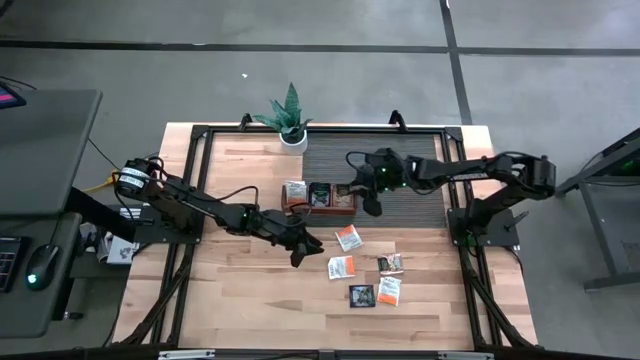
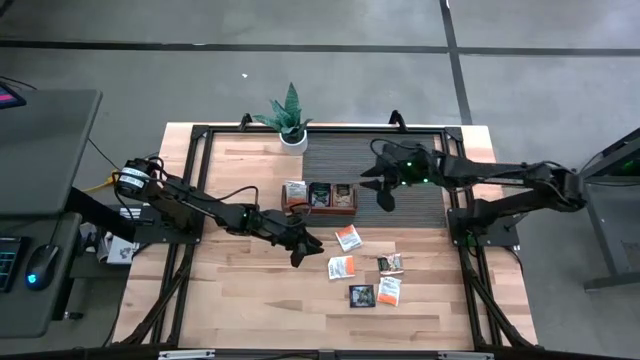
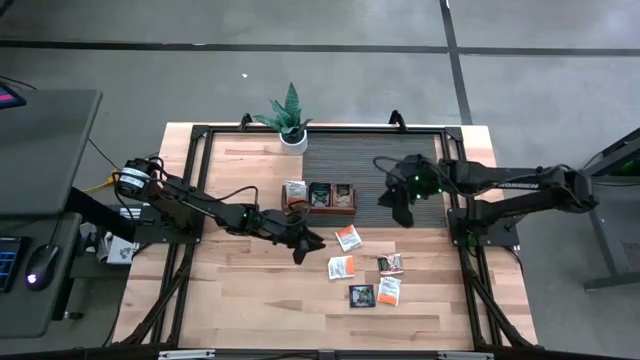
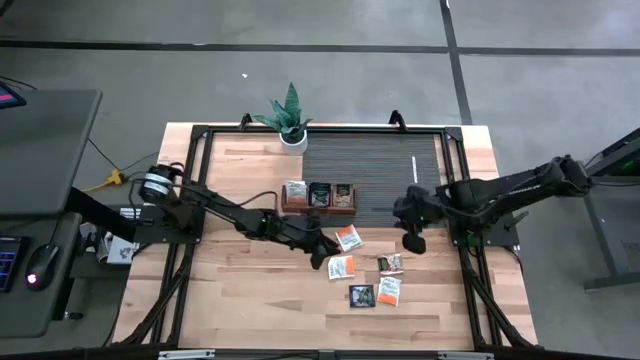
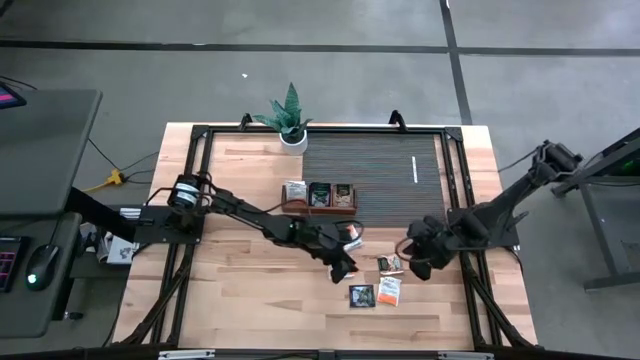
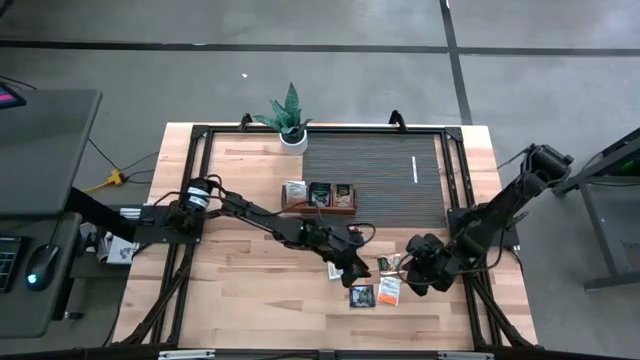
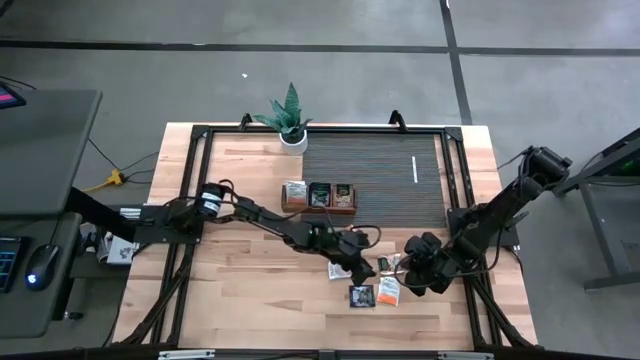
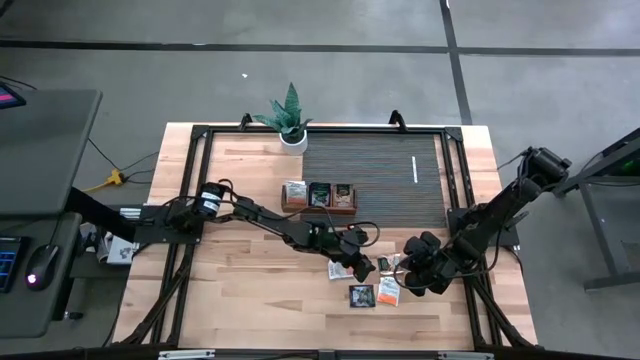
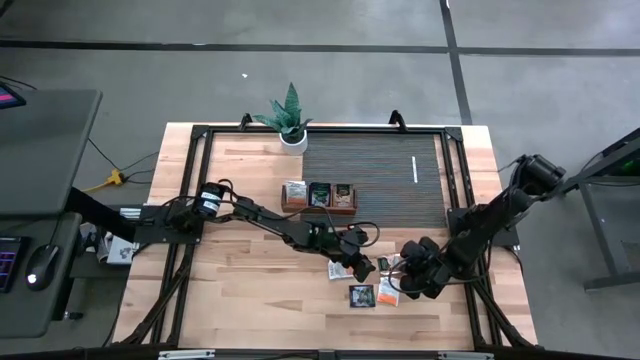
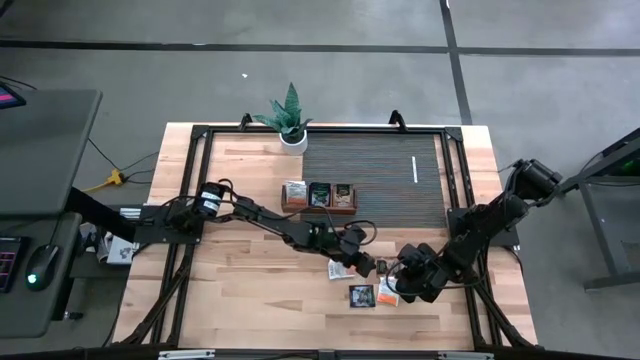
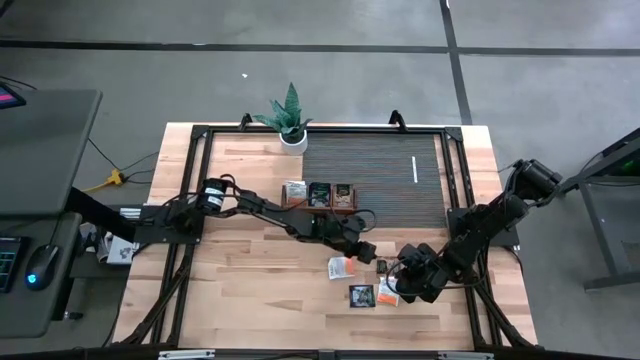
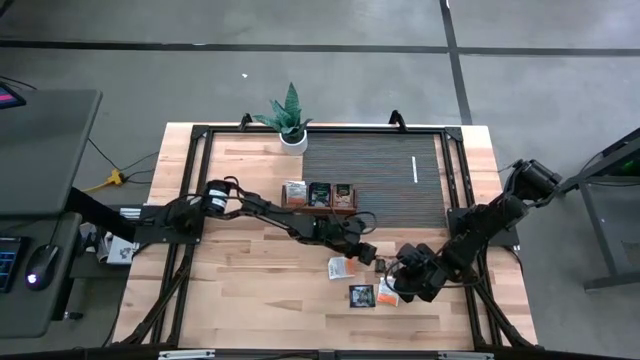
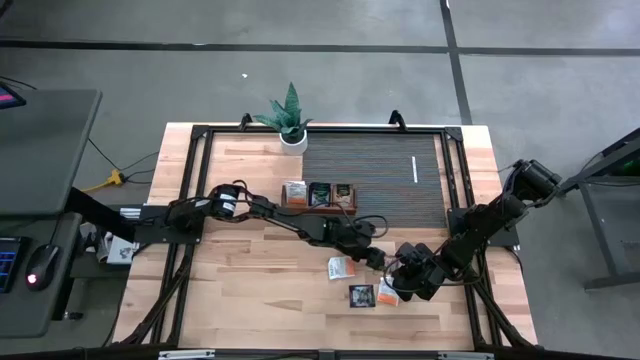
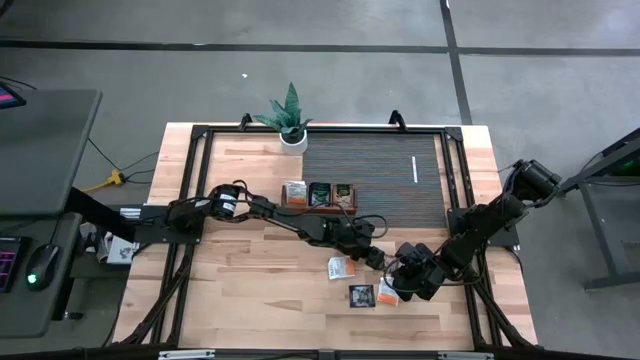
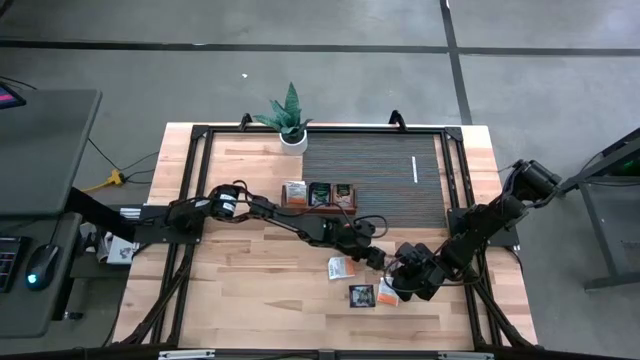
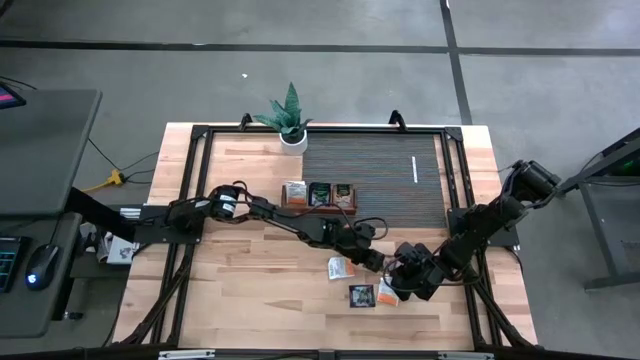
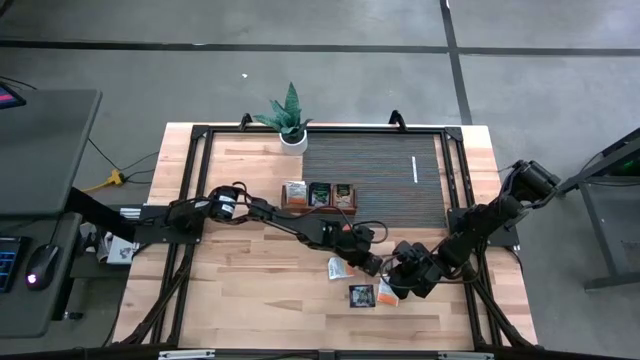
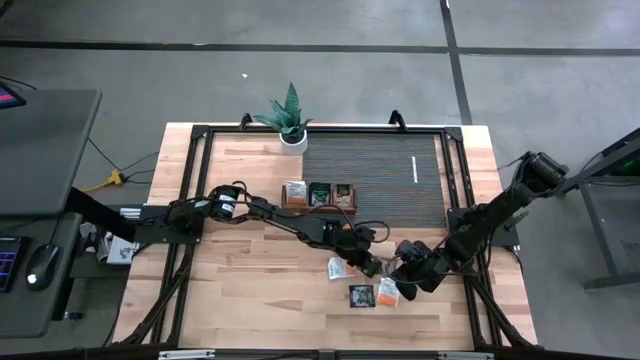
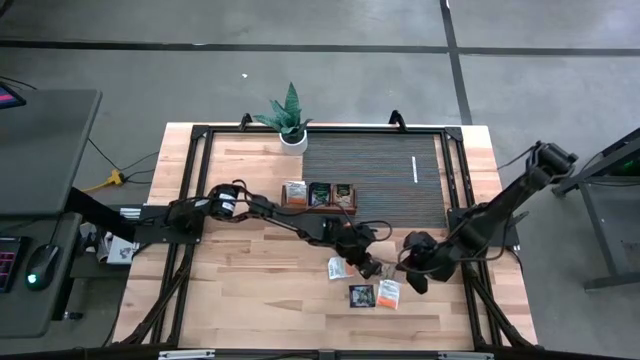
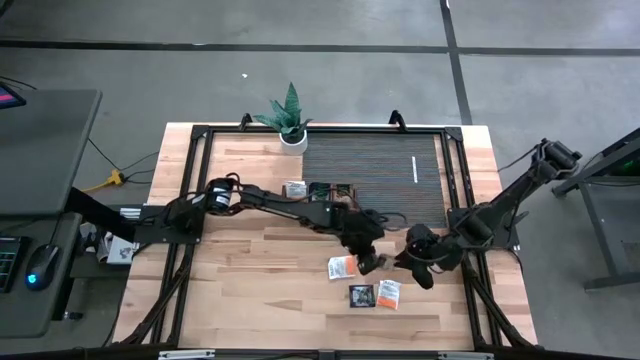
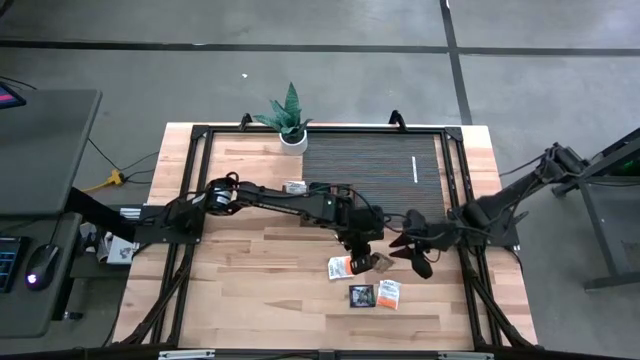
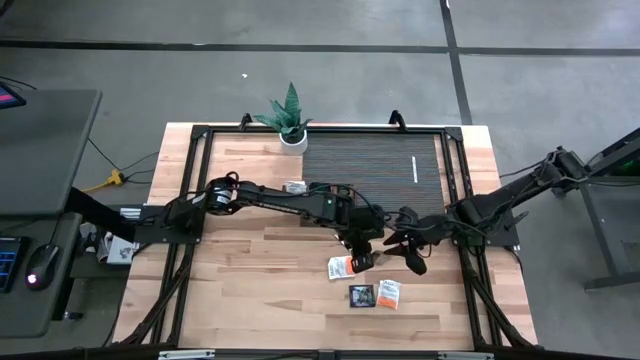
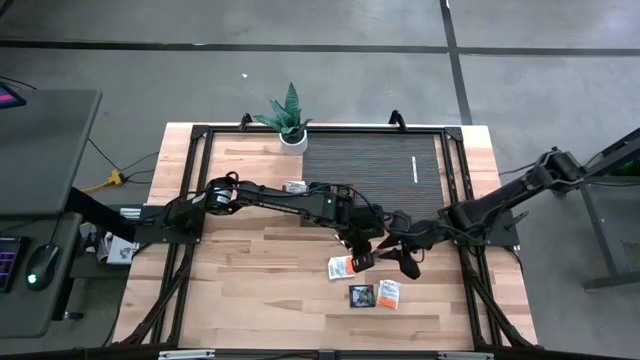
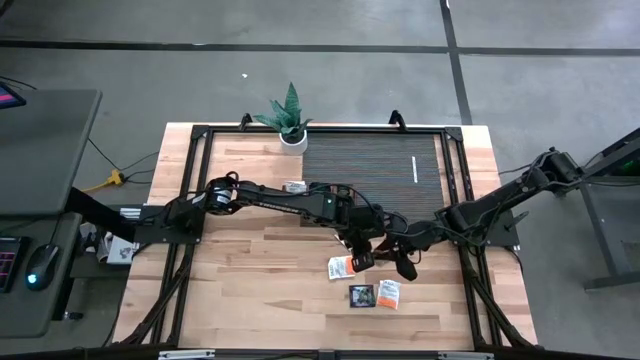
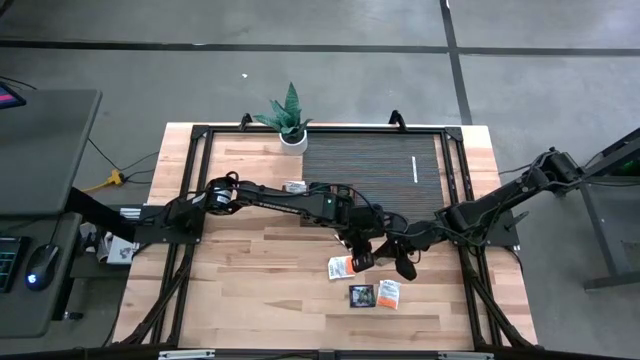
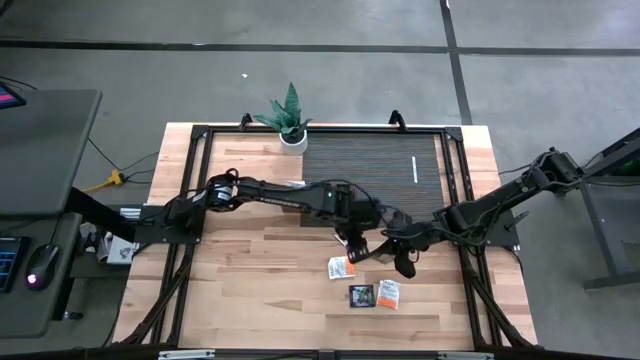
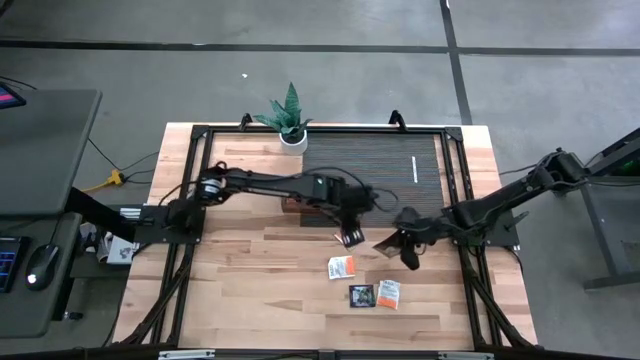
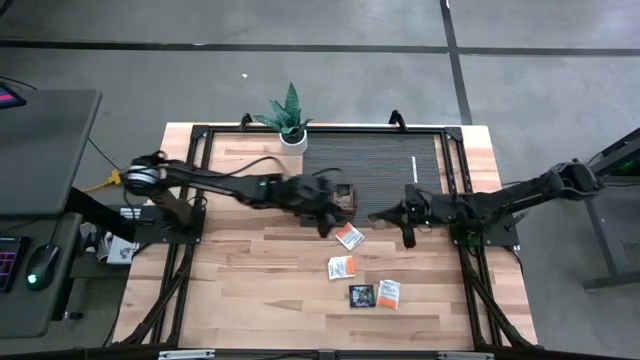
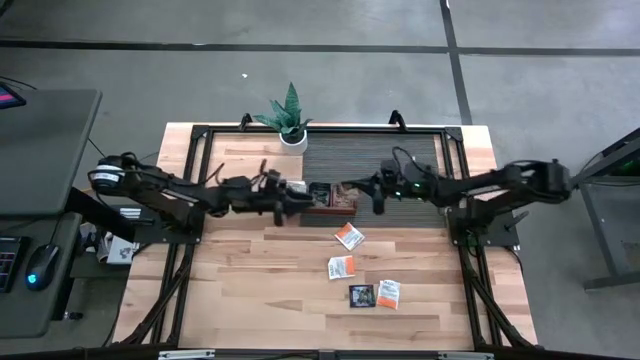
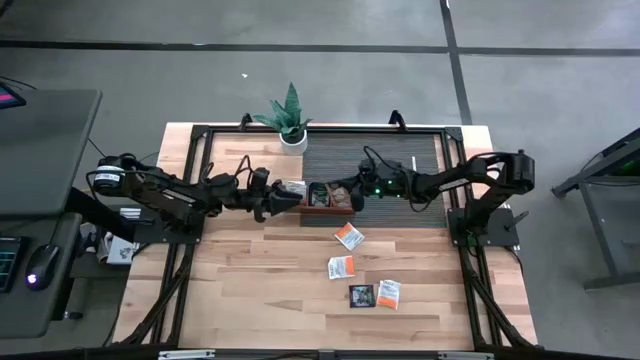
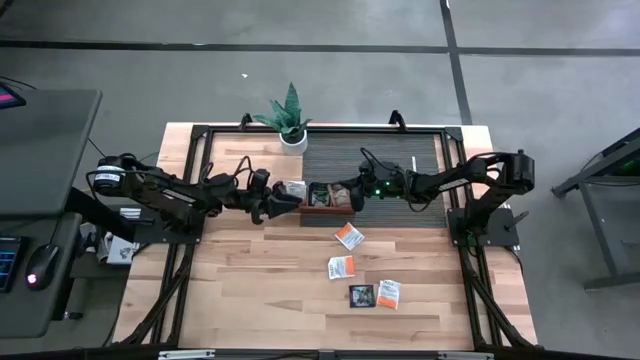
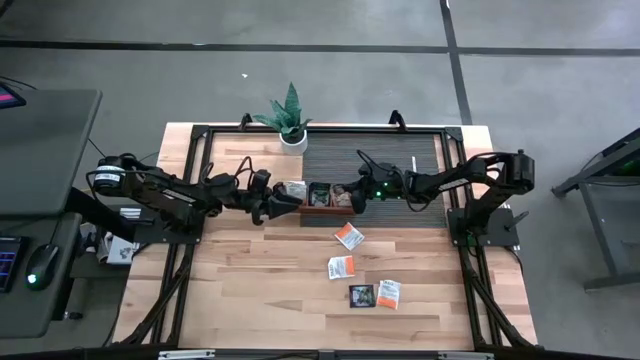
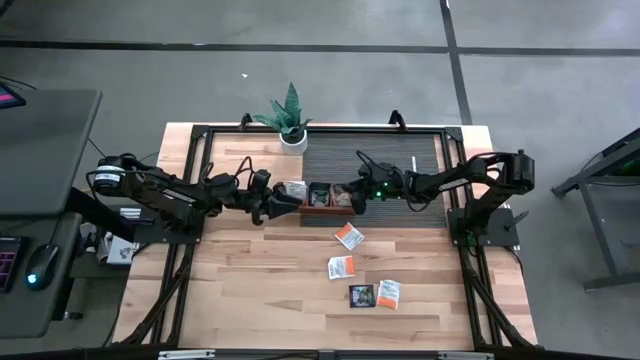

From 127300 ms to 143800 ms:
Task: Pick & Place Tea
Put the brown tea bag into the right section of the wooden organizer

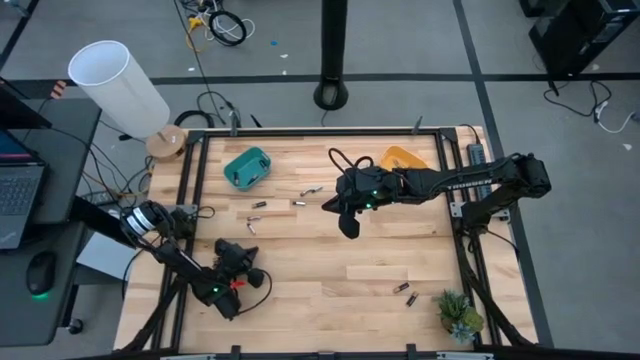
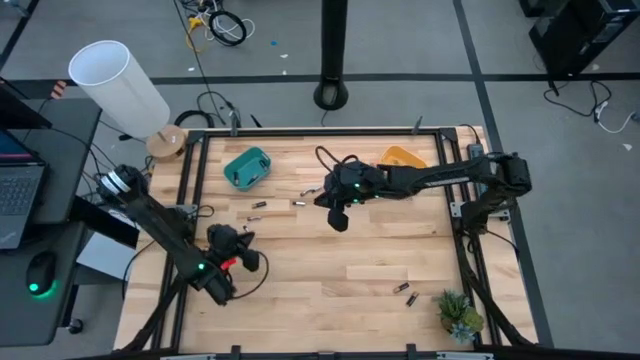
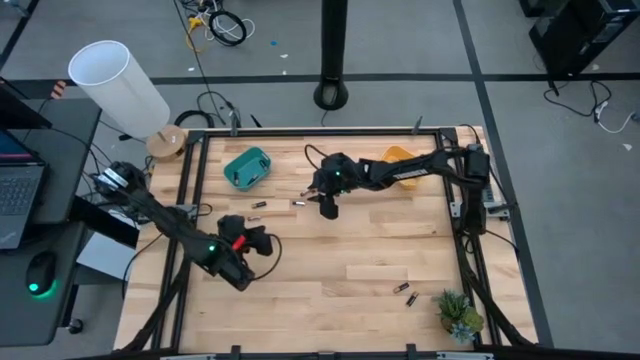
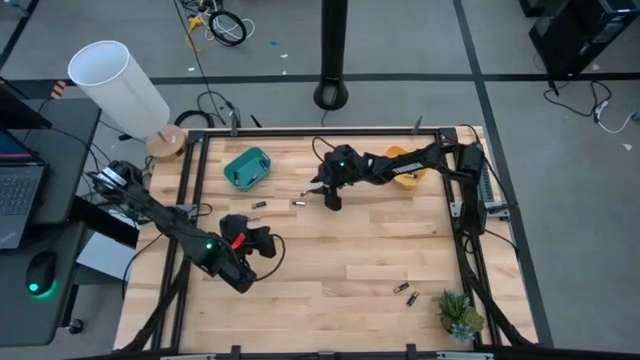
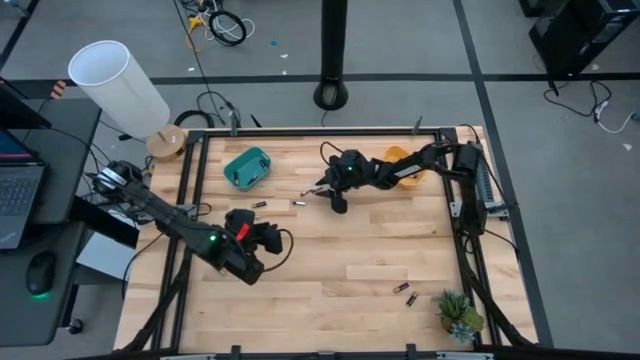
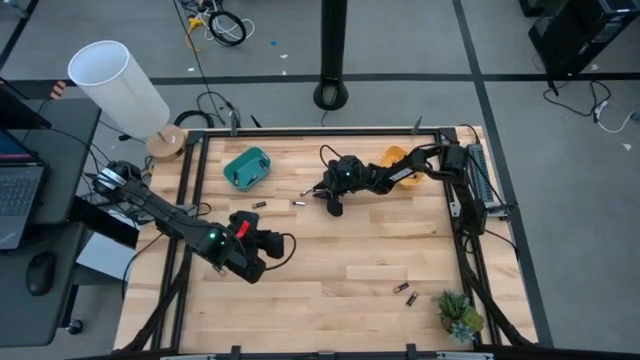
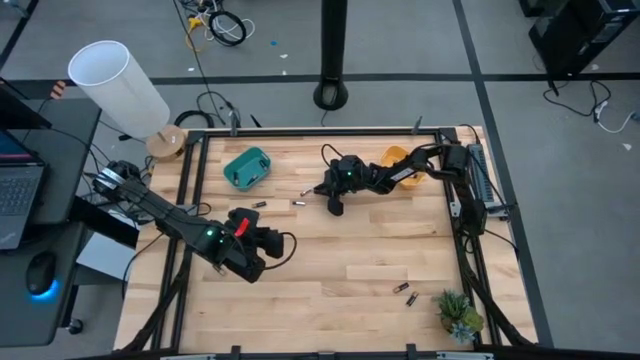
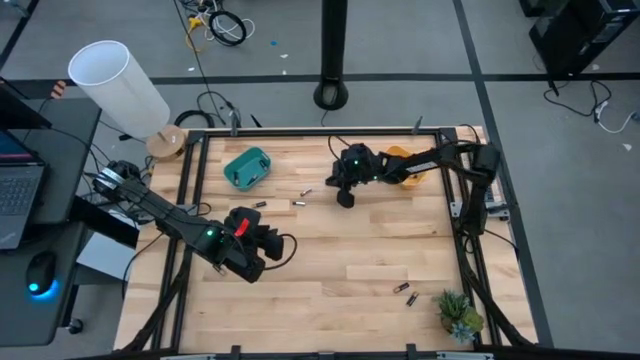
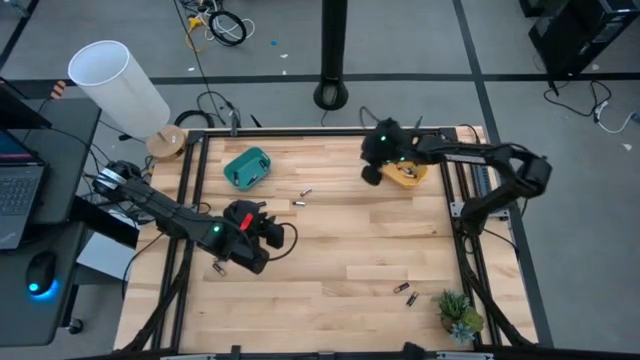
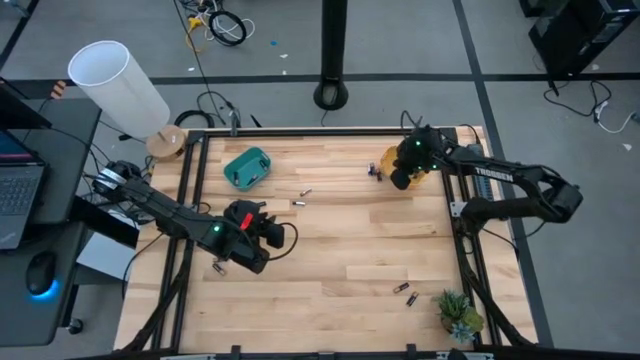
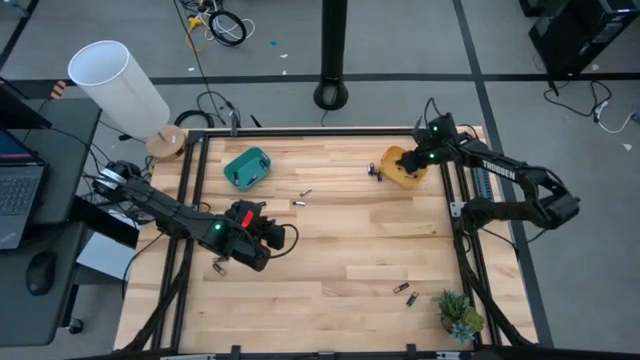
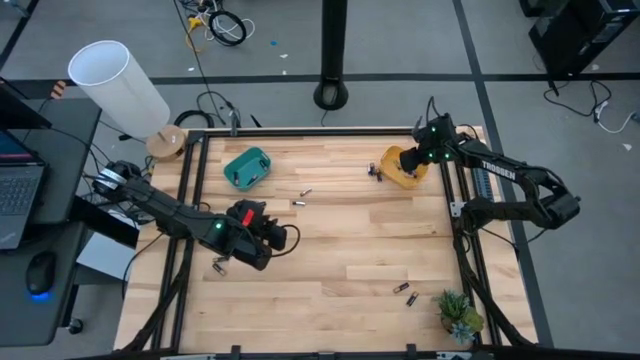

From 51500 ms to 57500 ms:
Task: Sort batteries
Put the silver battery into the yellow bin
